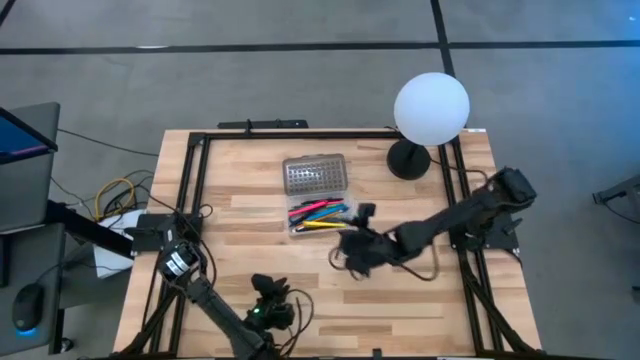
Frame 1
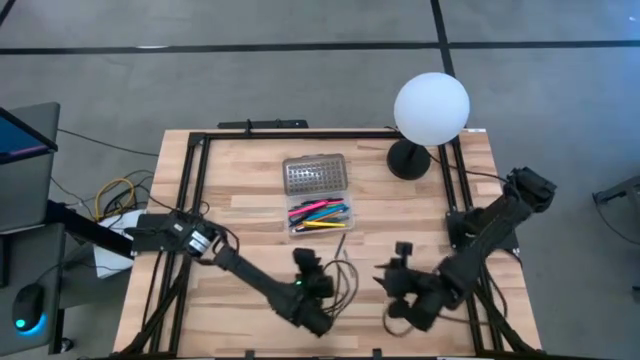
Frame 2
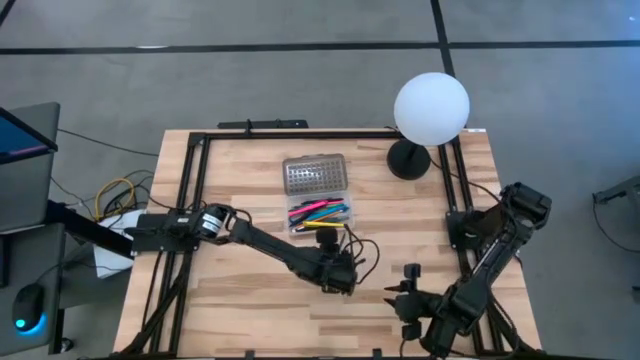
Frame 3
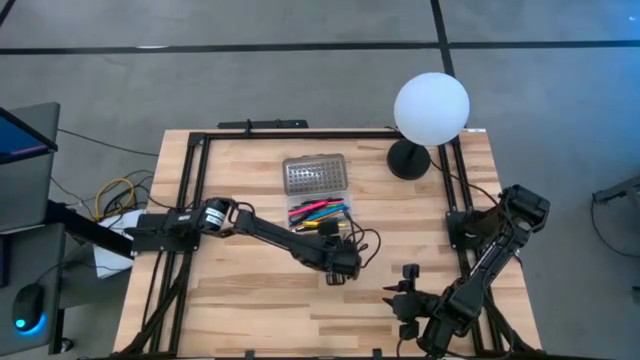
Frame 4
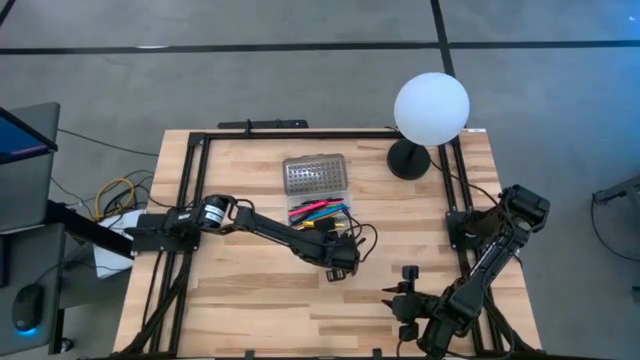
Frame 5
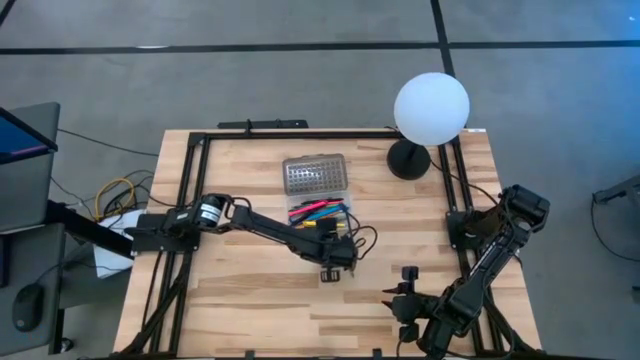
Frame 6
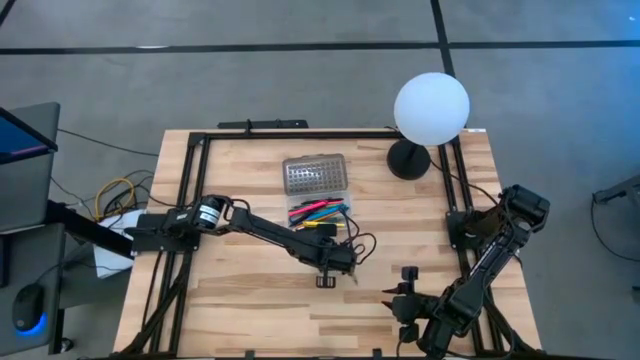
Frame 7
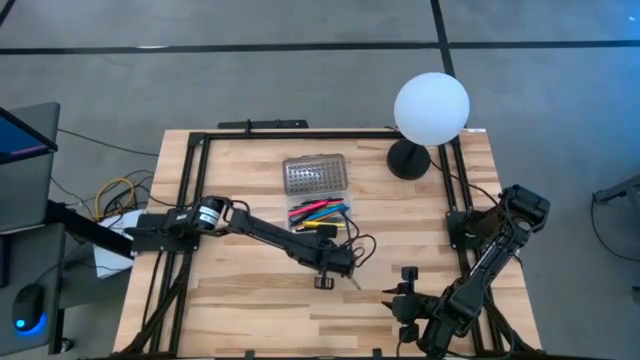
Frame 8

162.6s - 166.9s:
Task: Pick & place school supplies into a supply box
Put the green crayon into the gray supply box

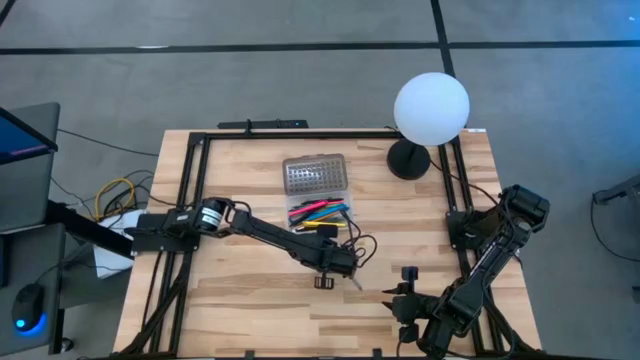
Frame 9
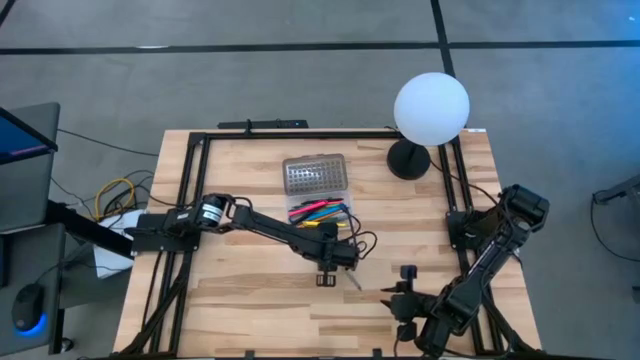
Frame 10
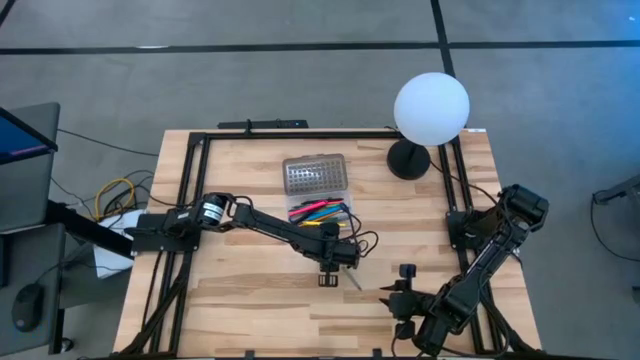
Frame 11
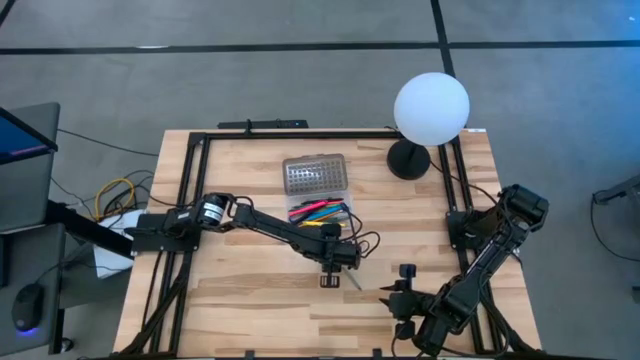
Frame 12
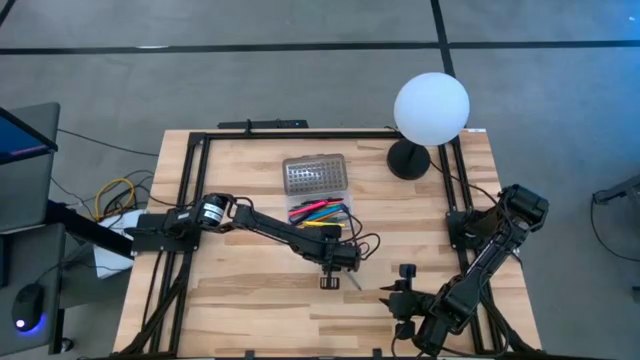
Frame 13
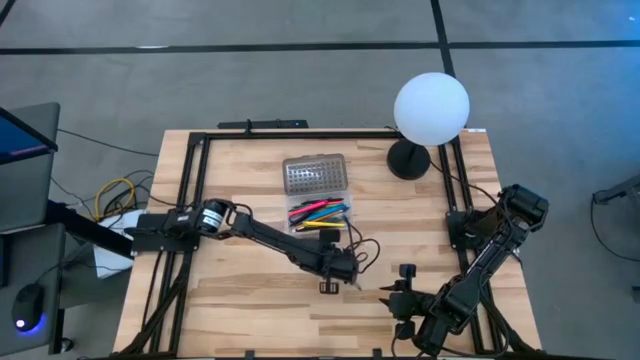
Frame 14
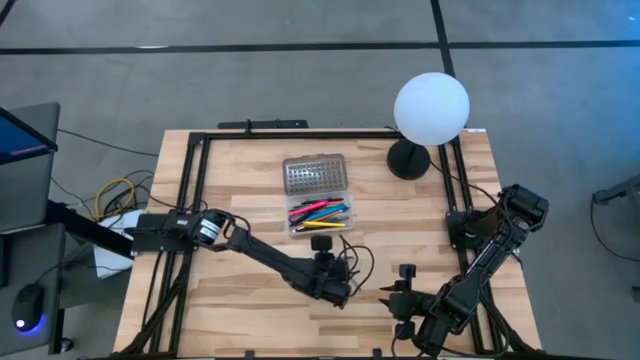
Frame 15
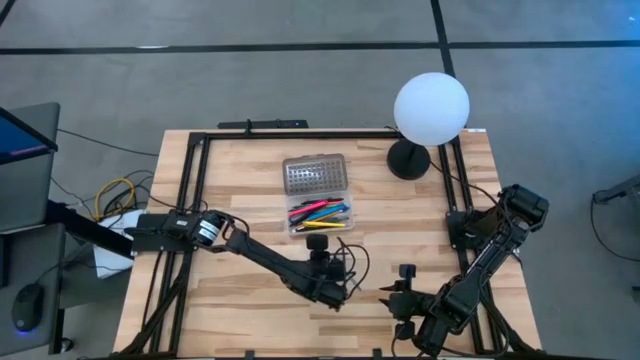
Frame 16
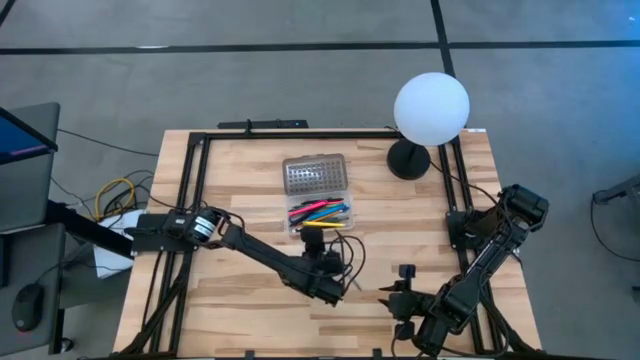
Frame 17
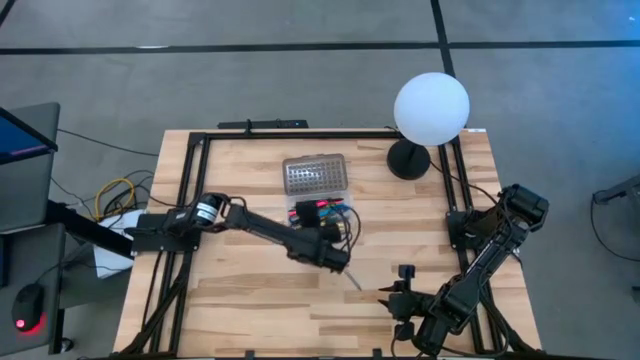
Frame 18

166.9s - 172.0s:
Put the green crayon into the gray supply box

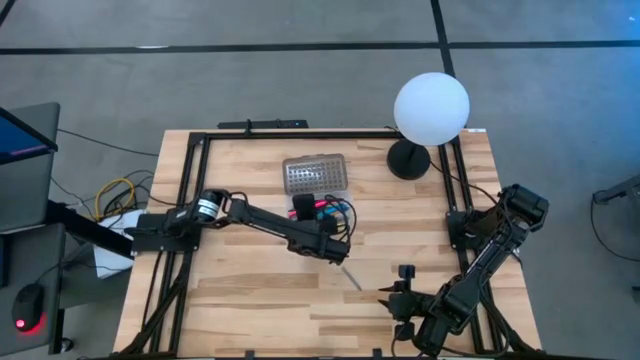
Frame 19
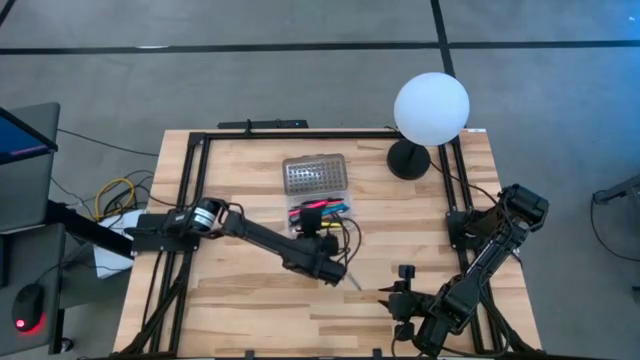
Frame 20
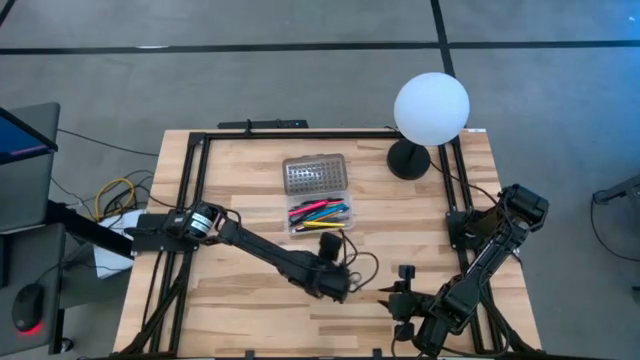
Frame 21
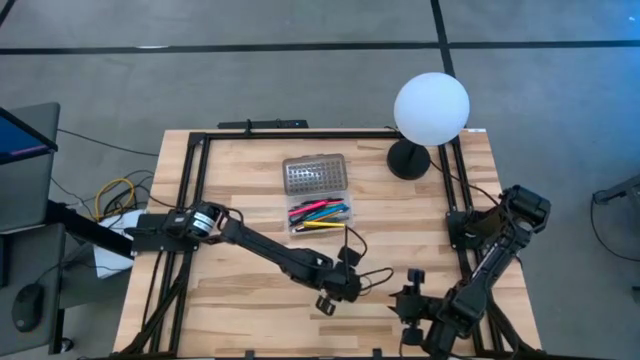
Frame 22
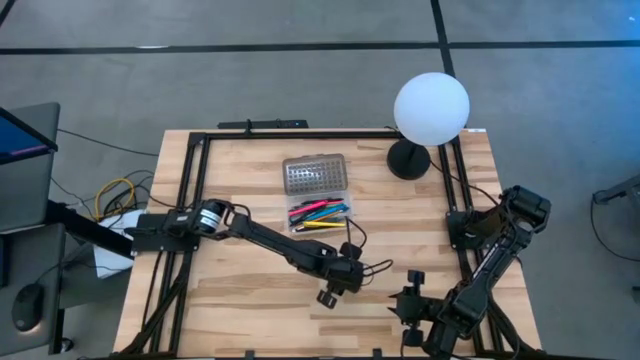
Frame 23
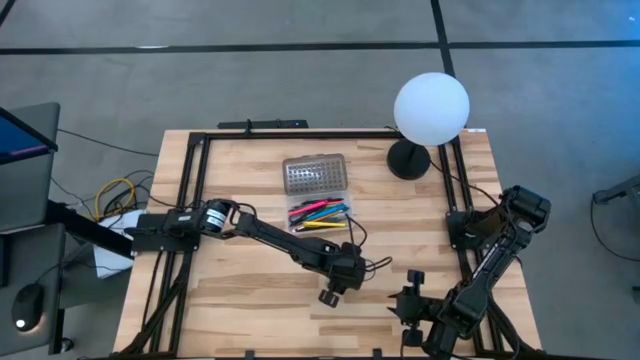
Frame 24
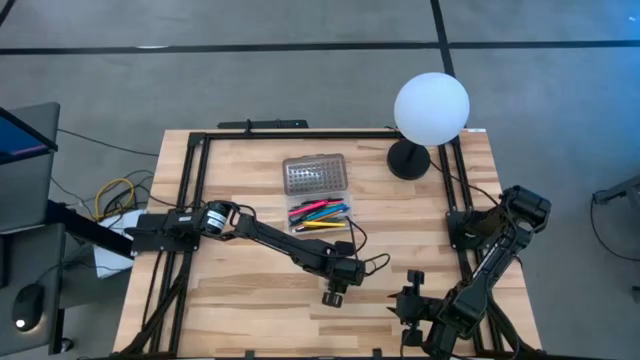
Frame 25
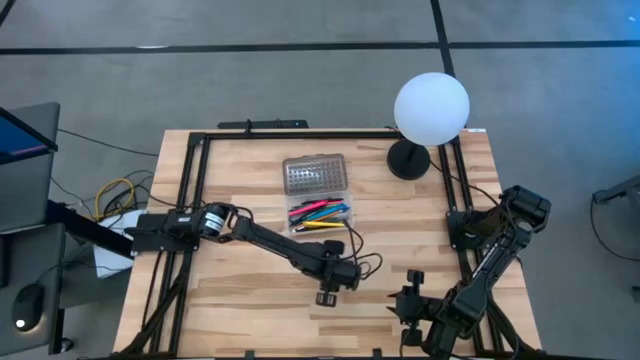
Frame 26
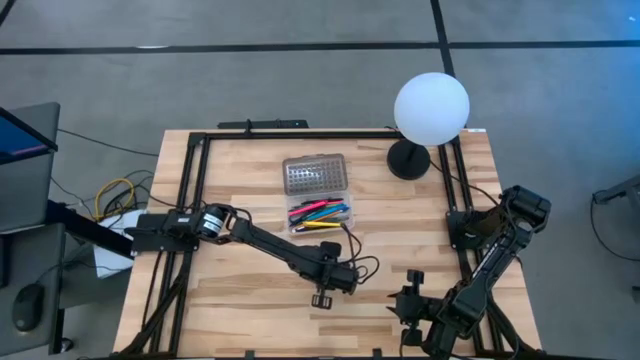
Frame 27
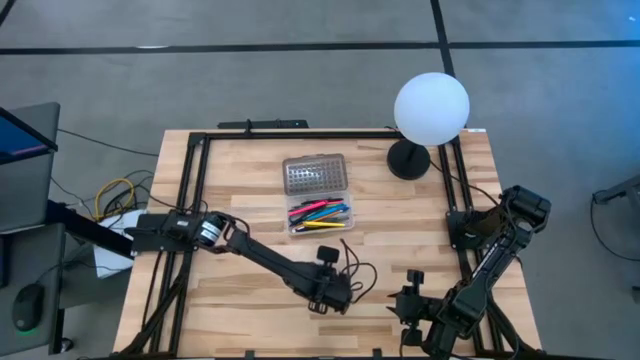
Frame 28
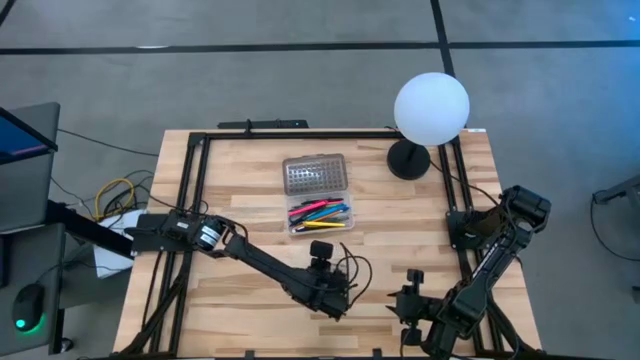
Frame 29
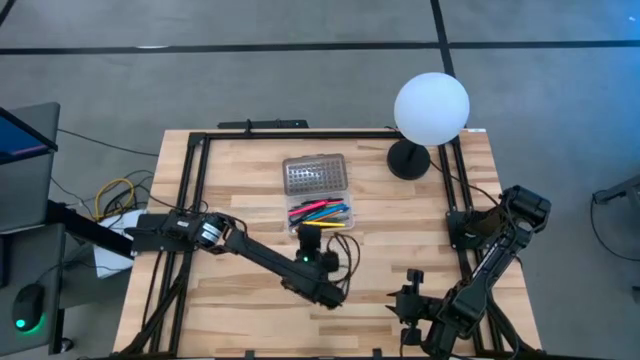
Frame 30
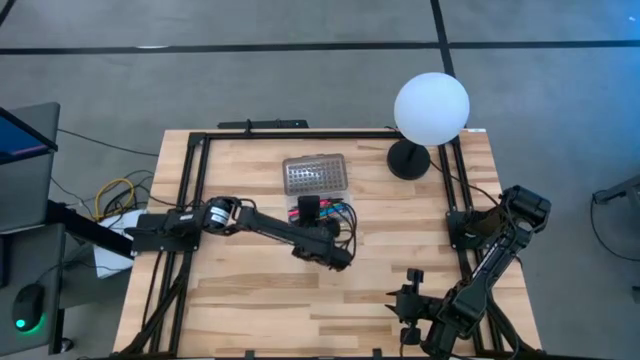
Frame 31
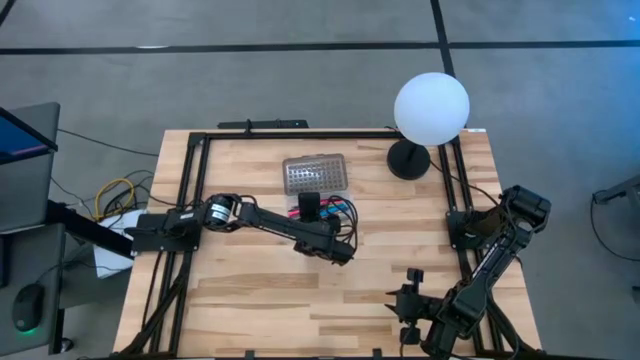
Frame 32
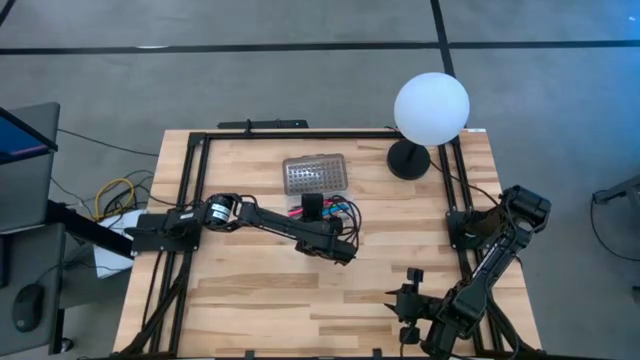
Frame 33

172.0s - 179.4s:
Put the gray crayon into the gray supply box

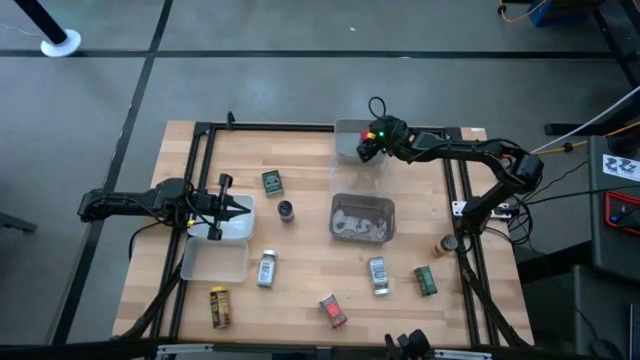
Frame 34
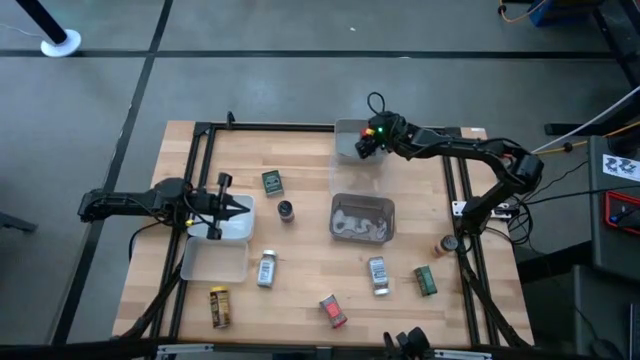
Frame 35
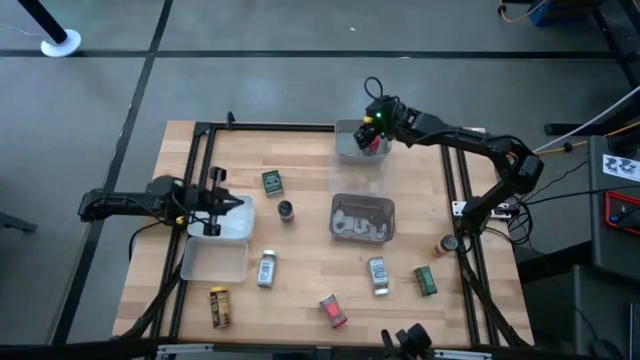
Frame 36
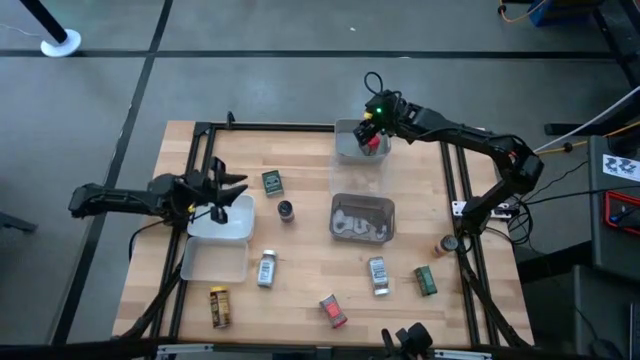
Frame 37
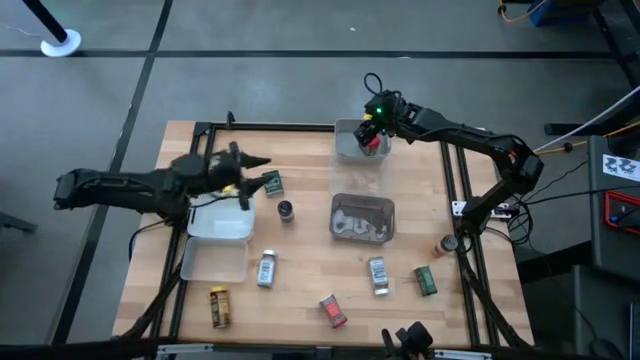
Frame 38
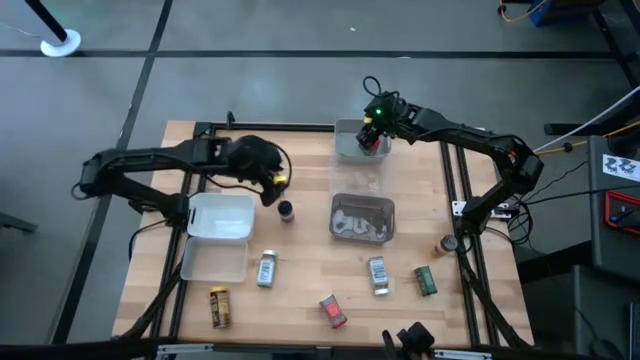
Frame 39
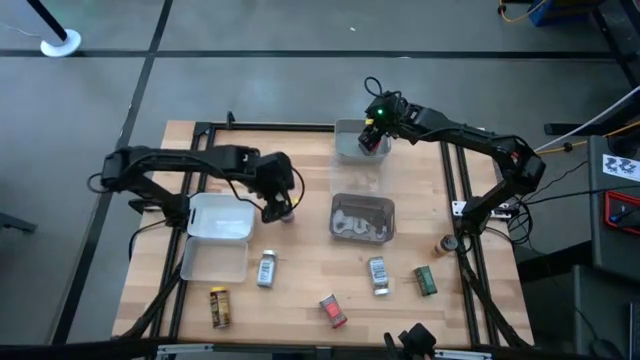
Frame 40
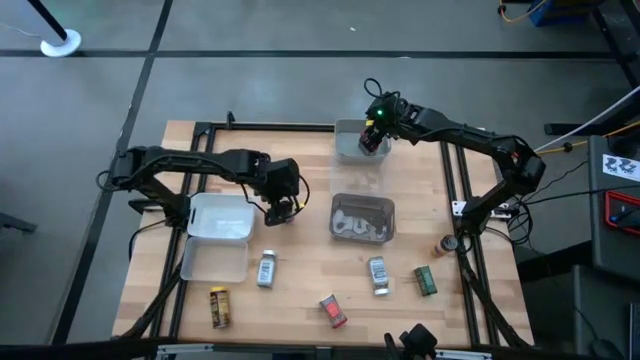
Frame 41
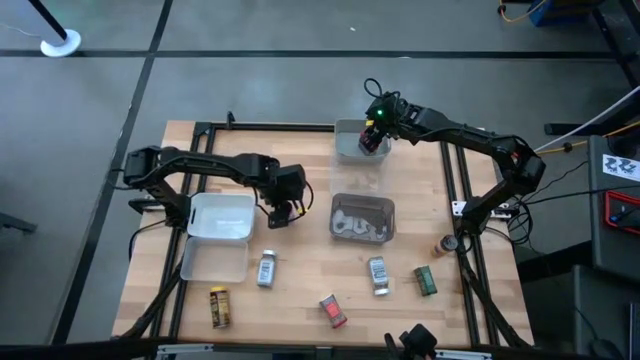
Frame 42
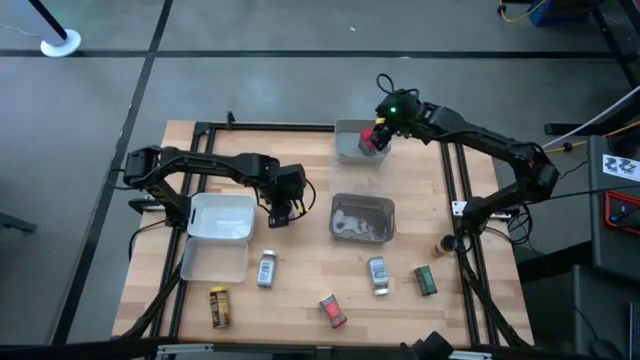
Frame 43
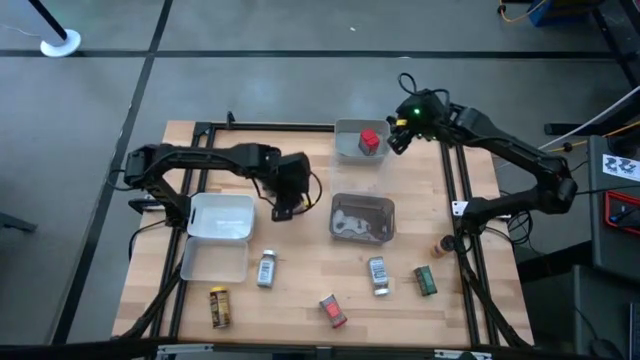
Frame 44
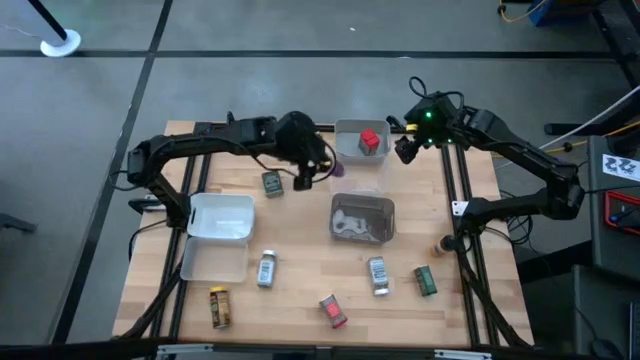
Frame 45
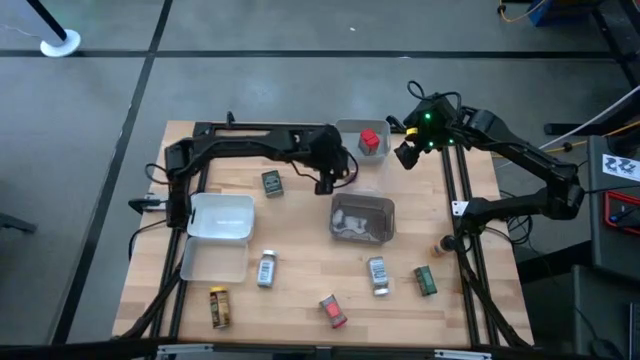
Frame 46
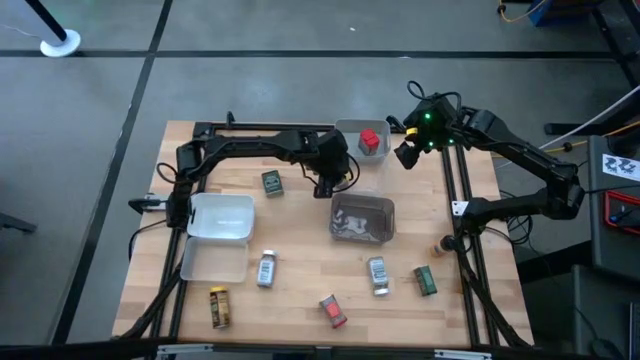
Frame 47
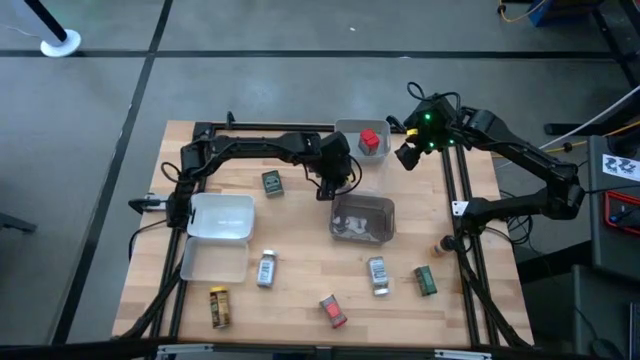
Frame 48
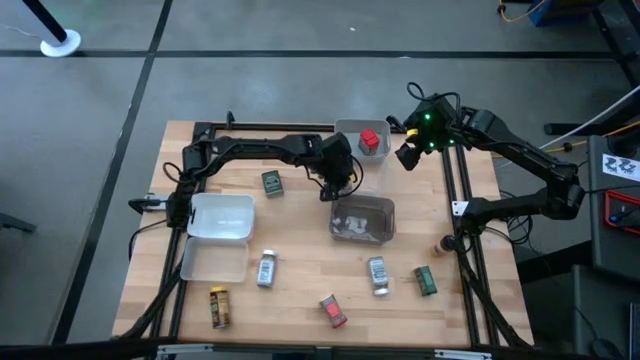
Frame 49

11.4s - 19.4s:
Task: Sort spices by type
Put the purple seasoning bottle into the top transparent bin
